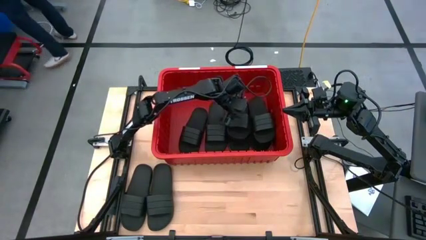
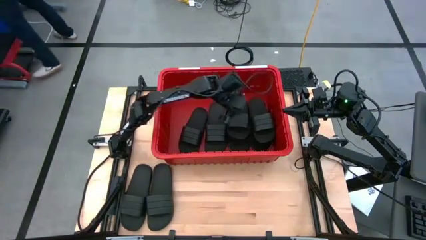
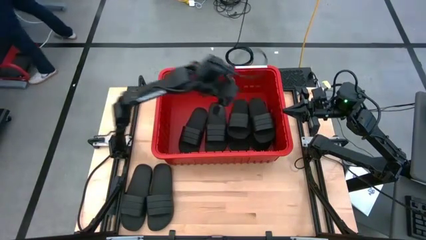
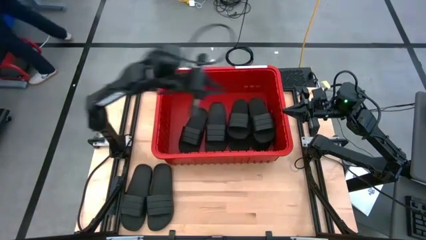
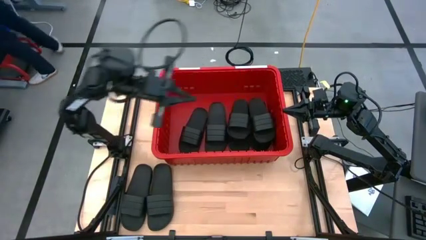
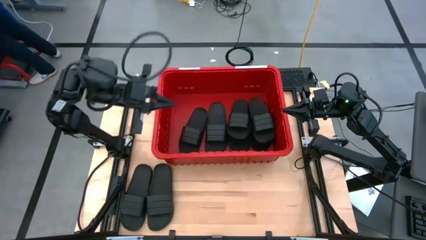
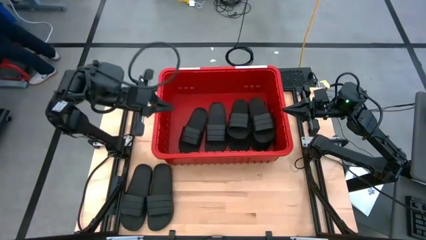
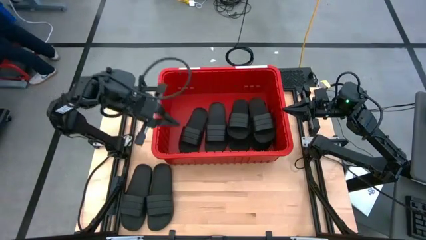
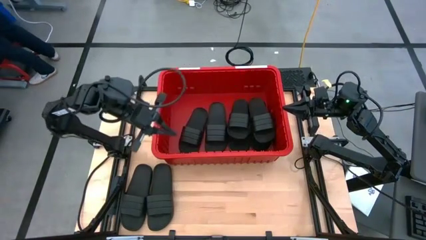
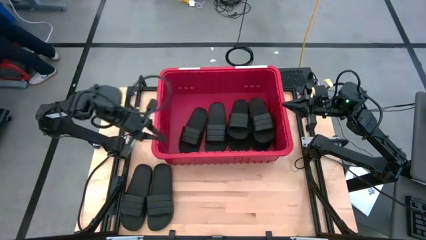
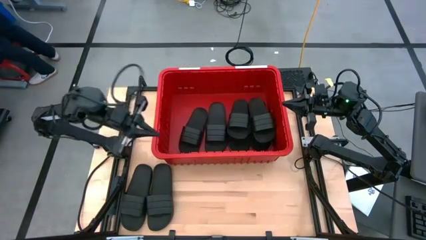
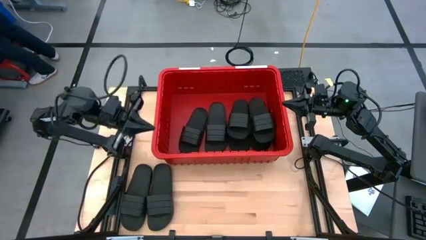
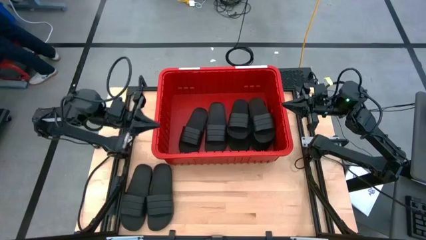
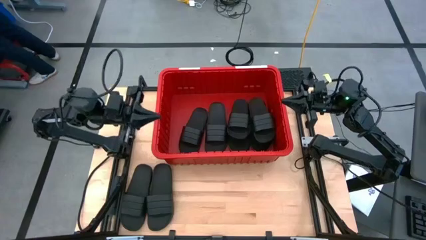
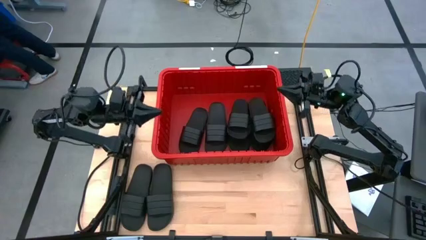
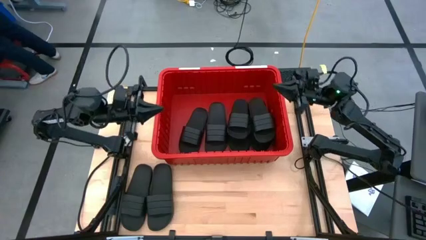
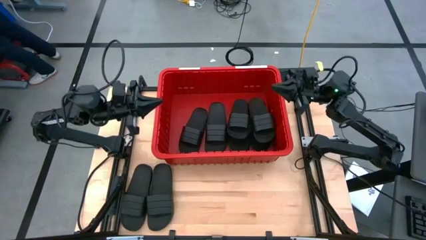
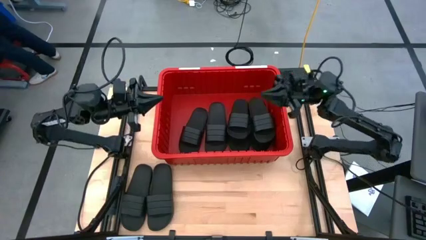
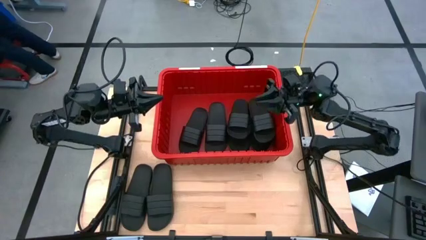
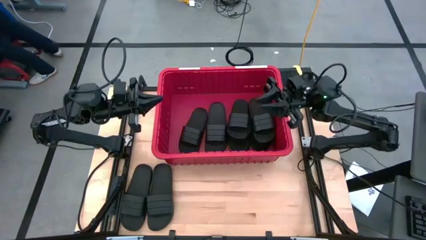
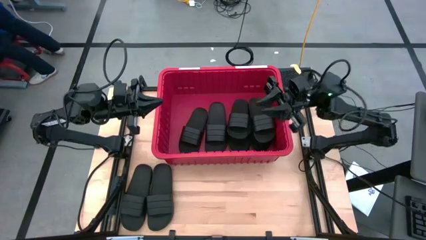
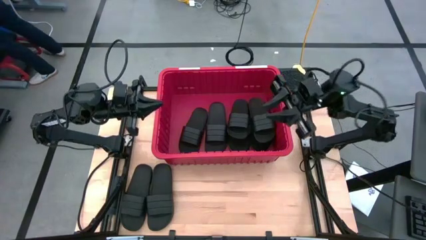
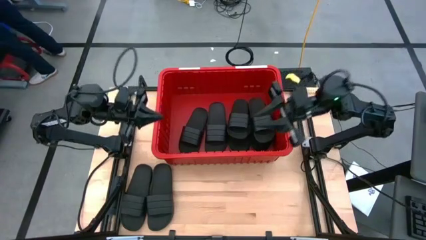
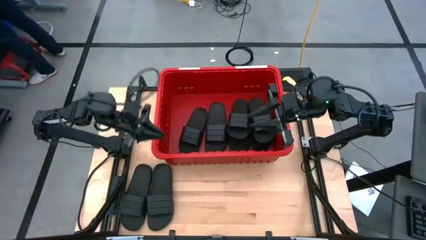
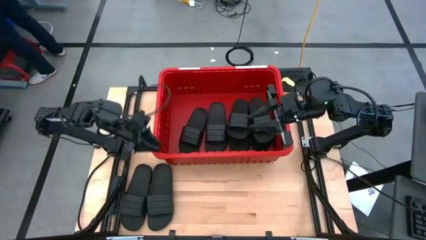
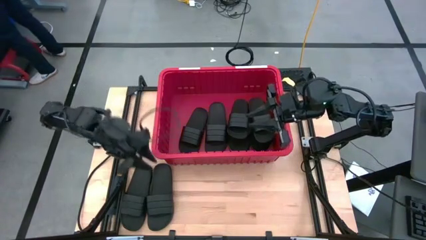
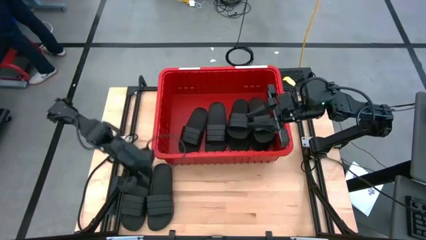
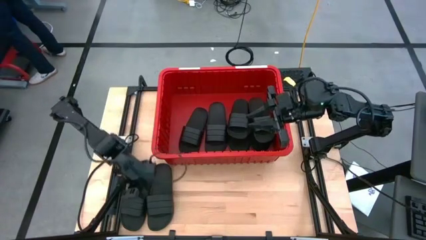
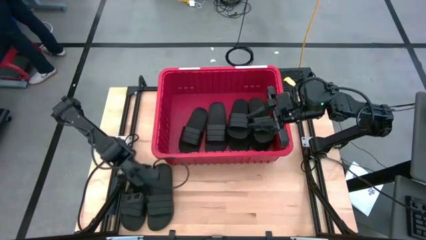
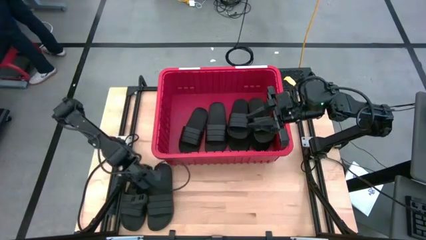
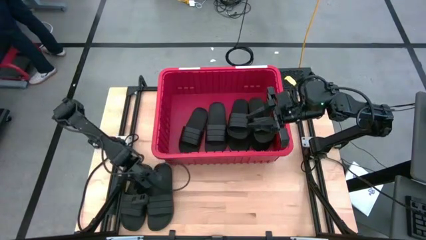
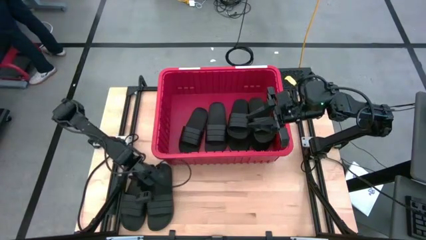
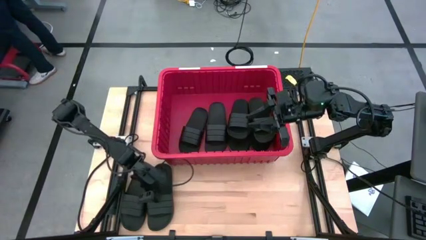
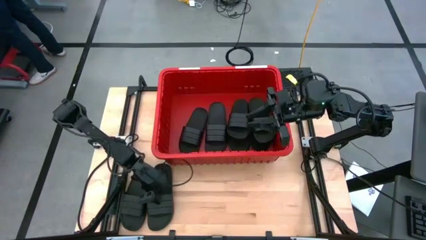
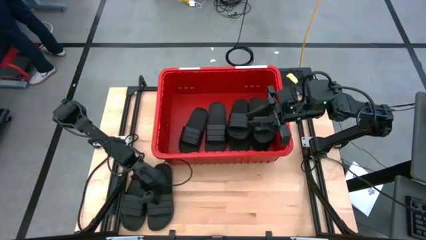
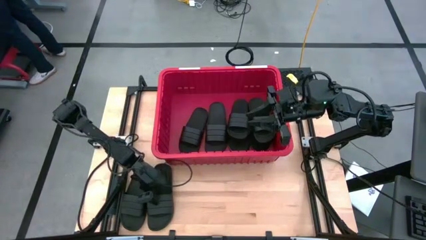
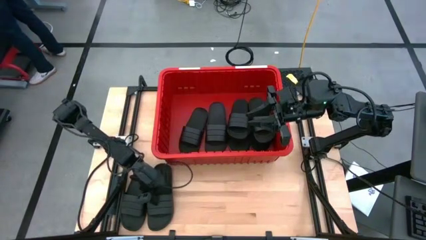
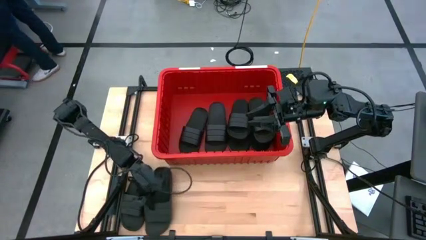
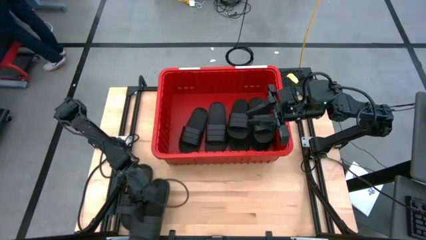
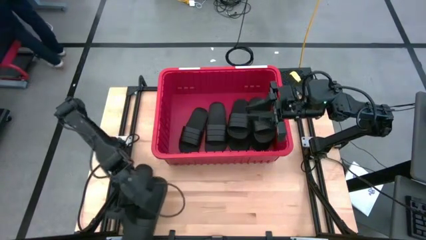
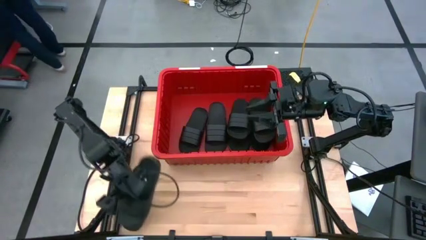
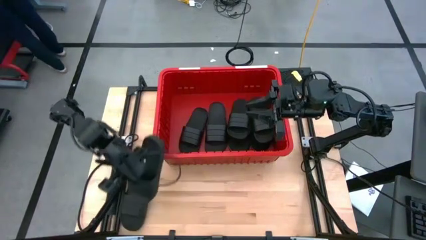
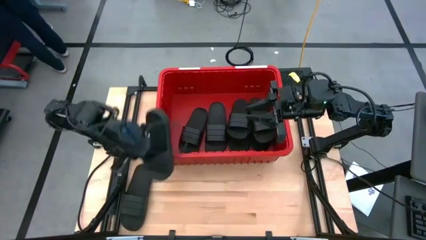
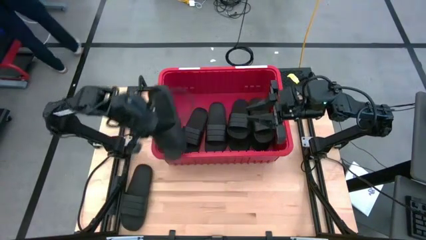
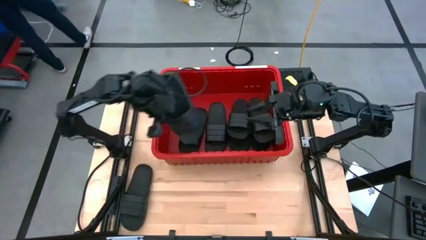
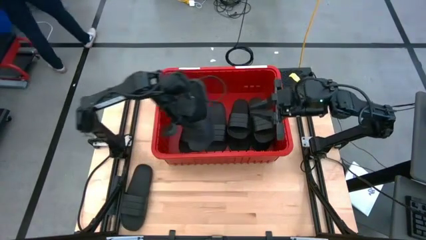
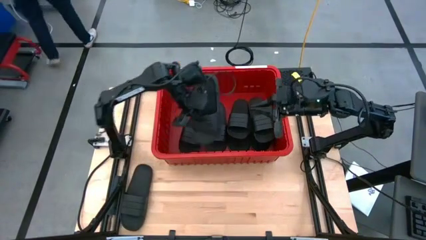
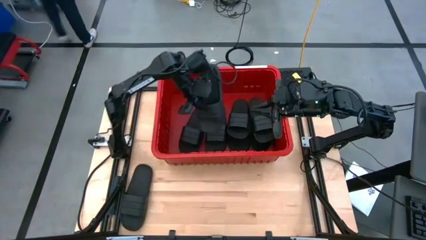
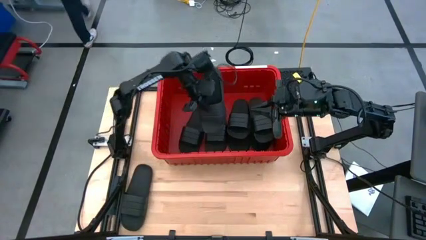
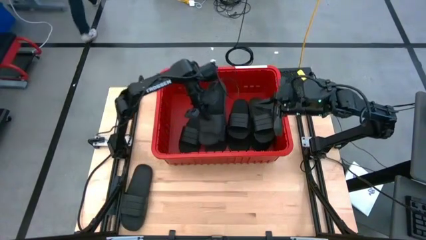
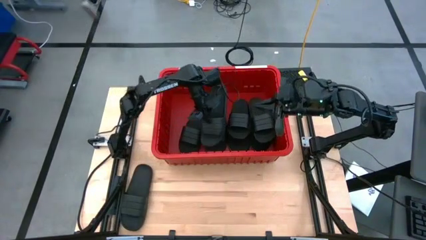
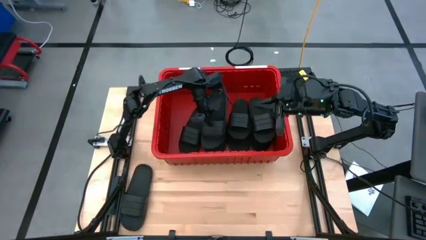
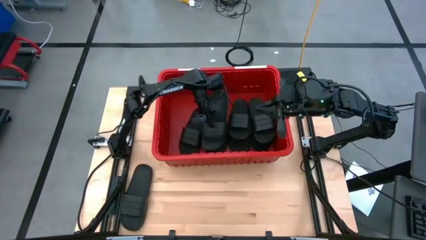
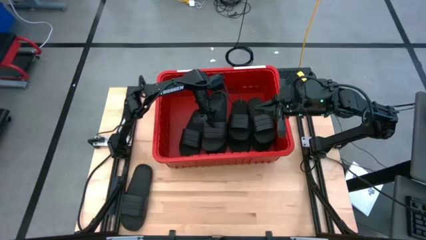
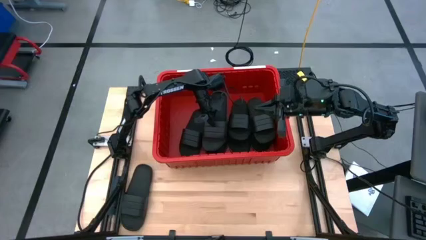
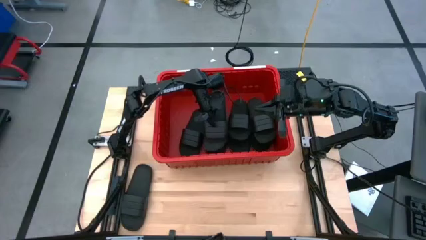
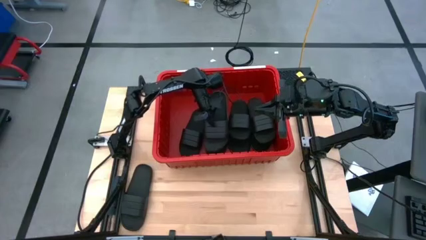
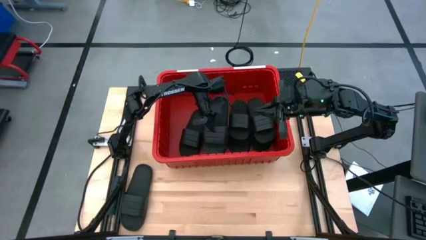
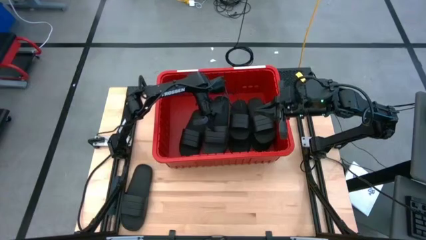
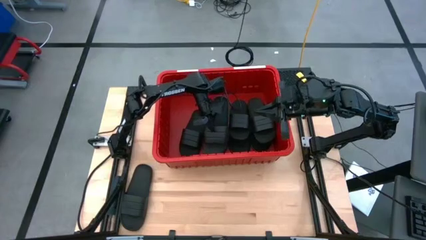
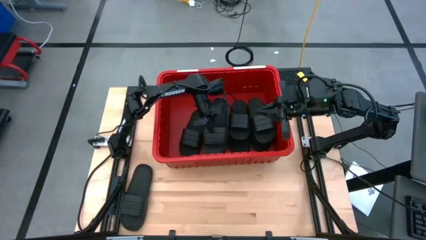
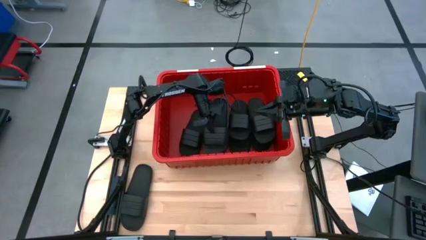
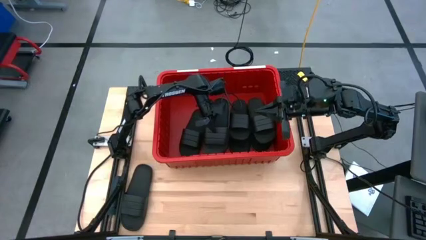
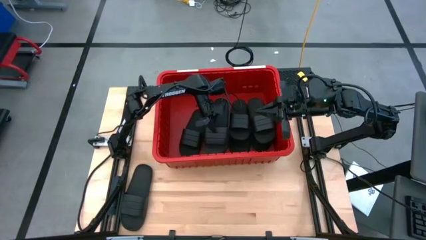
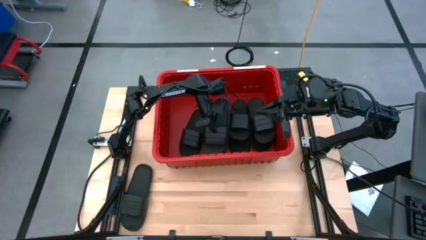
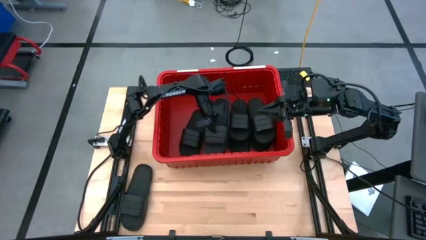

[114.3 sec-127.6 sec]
Task: Pick and place slides into bin
Put the black slide into the red bin

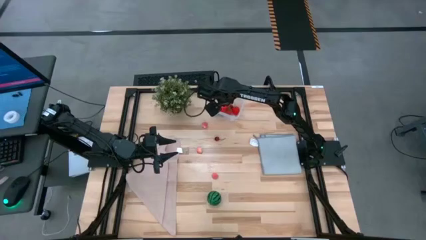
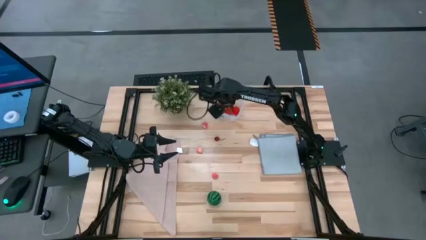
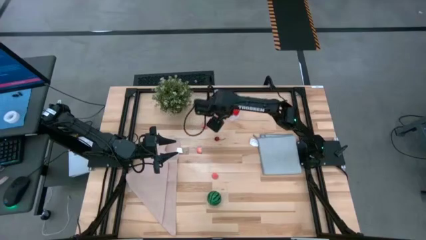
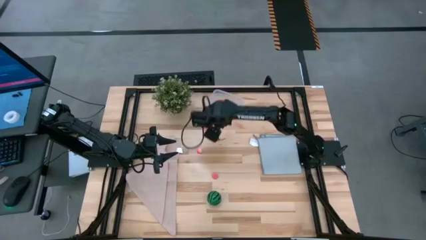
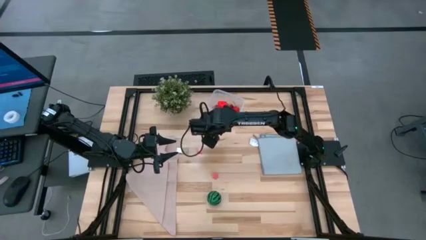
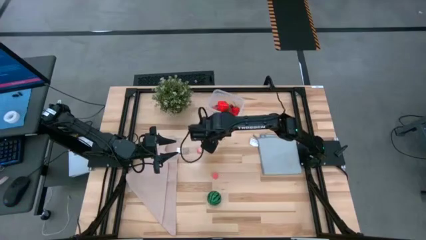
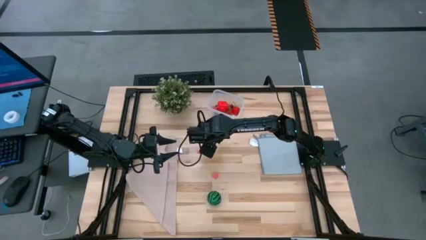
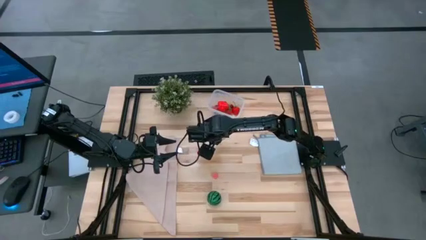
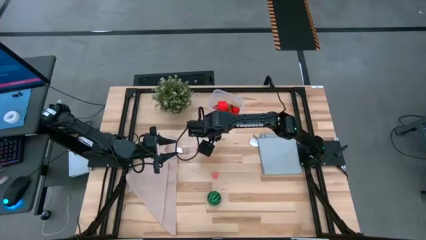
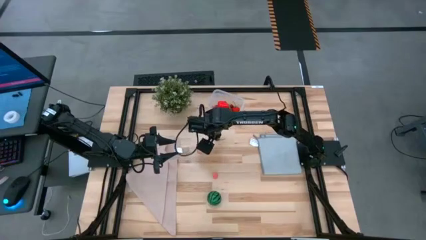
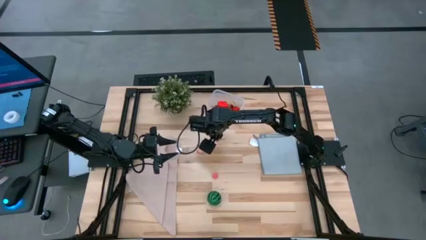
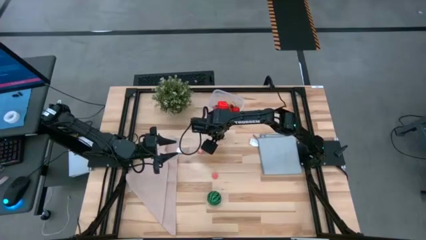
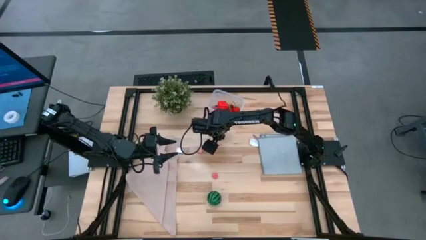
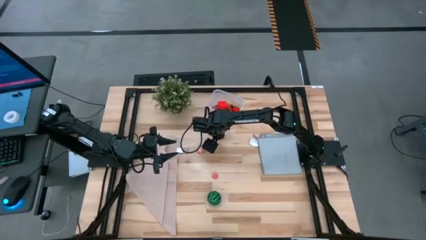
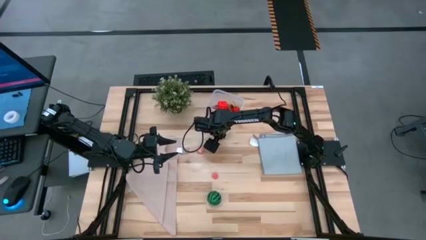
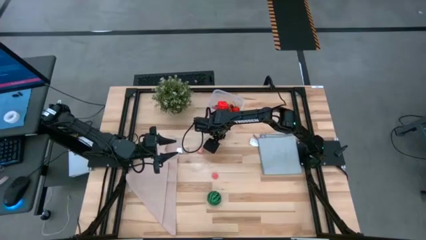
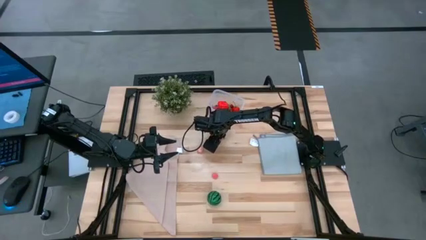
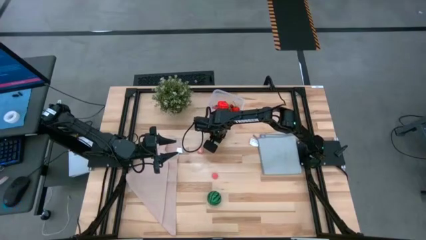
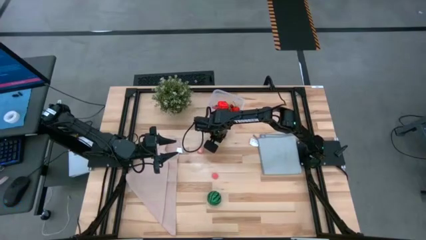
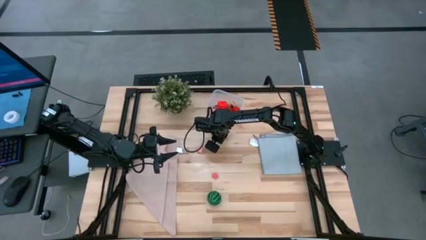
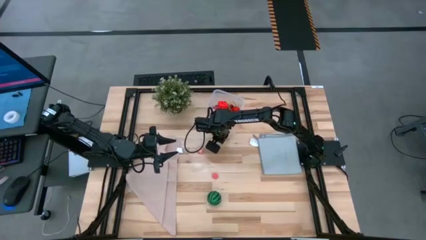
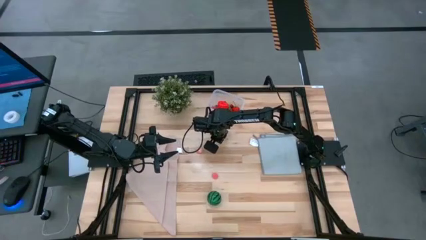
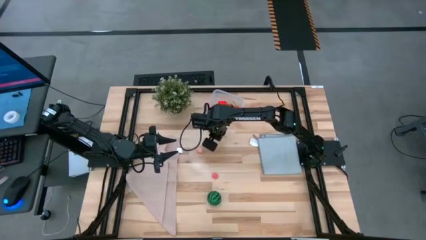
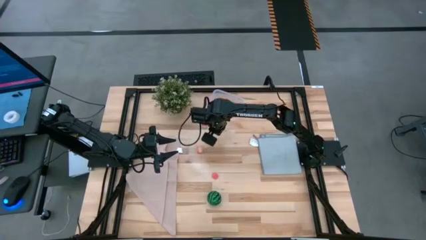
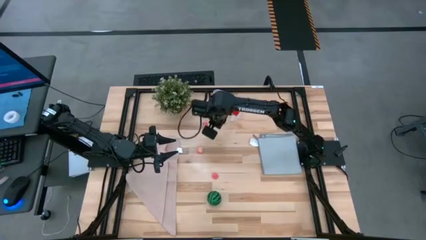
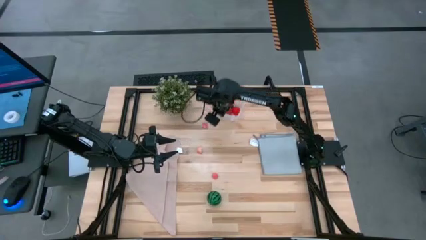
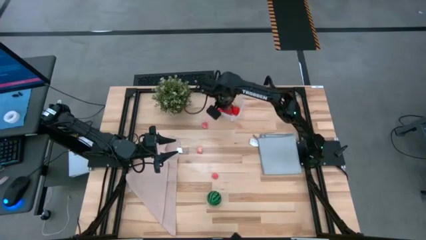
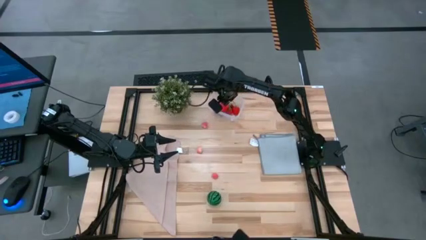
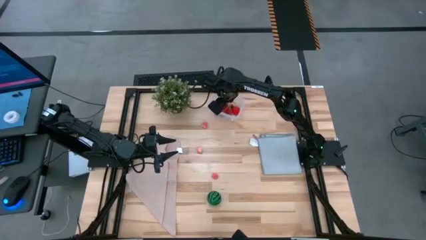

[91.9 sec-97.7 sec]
Task: Pick and placing Produce into tupperware
Put the red cherry into the transparent bin
